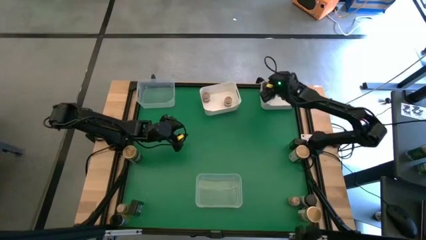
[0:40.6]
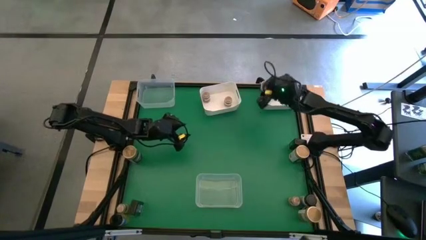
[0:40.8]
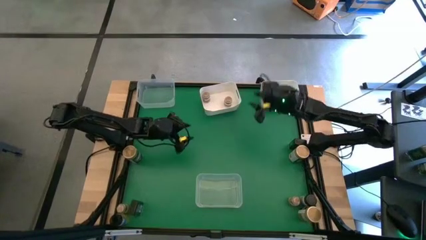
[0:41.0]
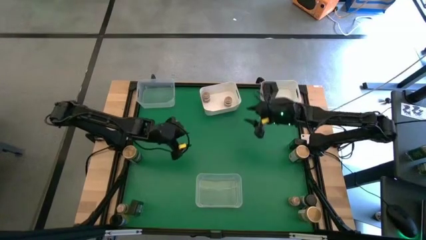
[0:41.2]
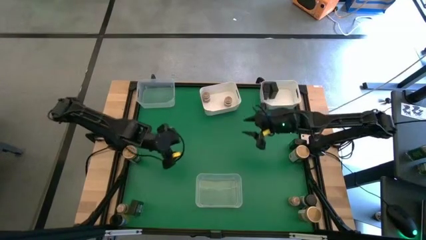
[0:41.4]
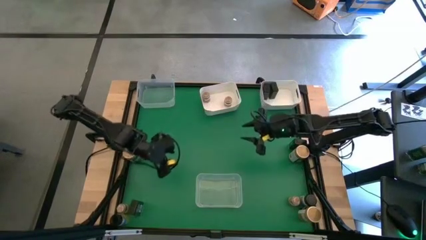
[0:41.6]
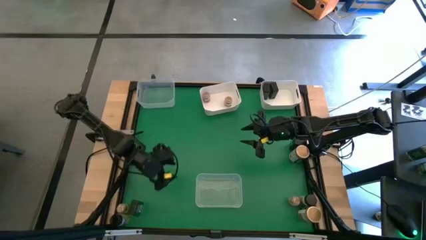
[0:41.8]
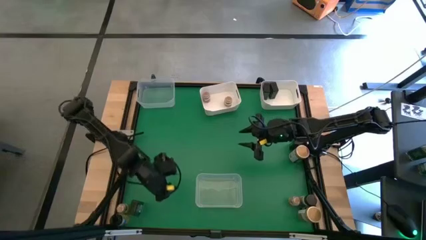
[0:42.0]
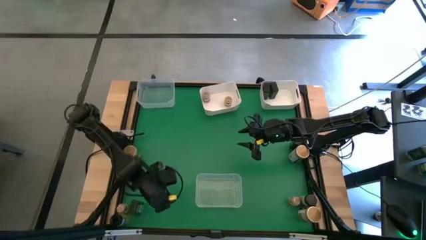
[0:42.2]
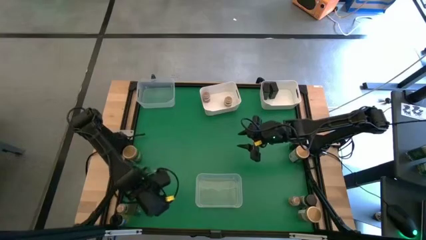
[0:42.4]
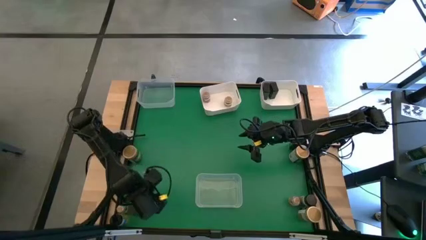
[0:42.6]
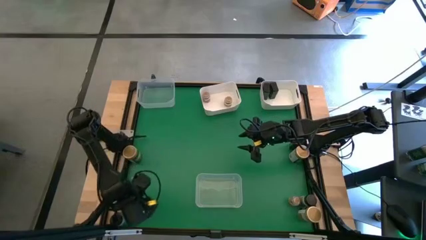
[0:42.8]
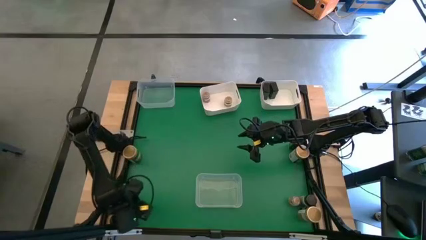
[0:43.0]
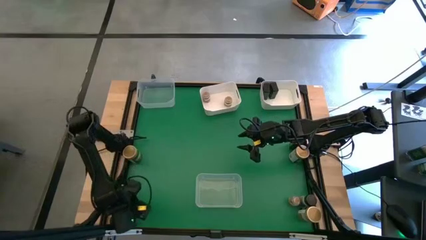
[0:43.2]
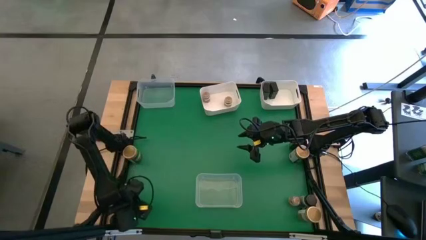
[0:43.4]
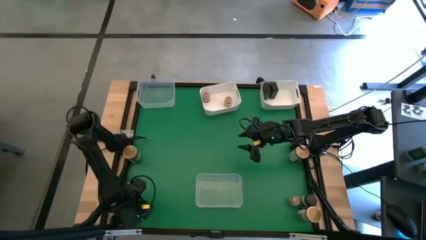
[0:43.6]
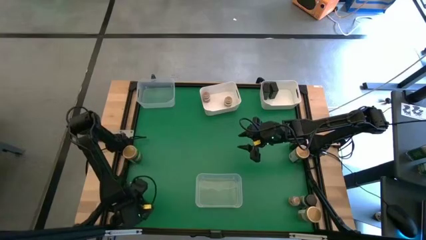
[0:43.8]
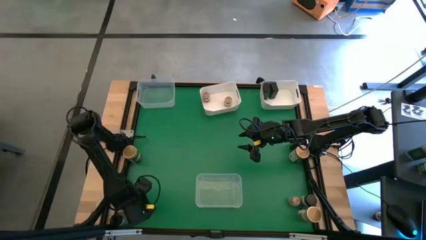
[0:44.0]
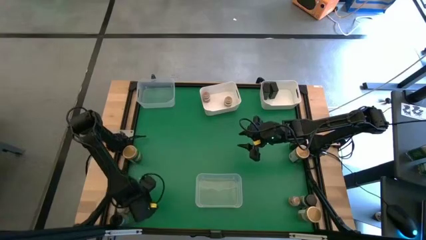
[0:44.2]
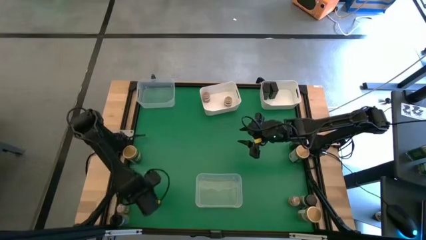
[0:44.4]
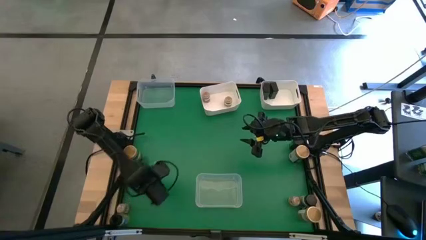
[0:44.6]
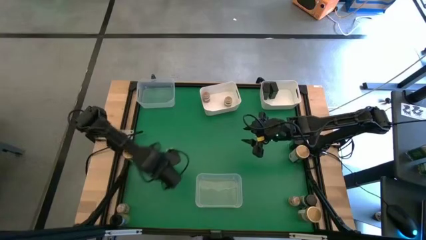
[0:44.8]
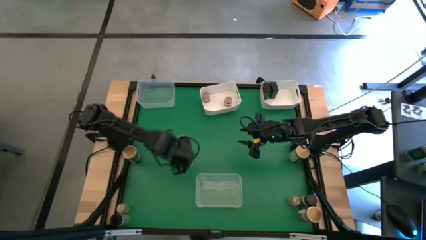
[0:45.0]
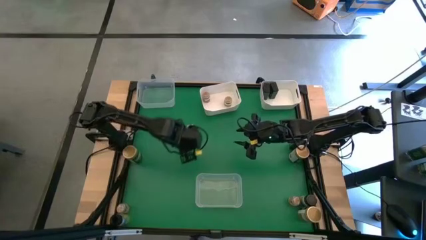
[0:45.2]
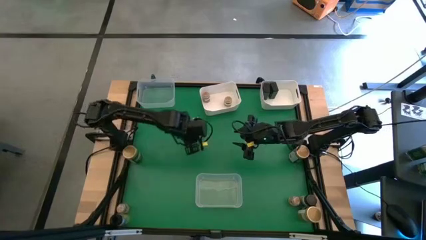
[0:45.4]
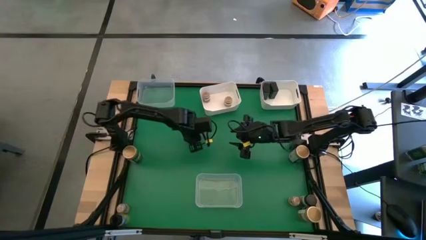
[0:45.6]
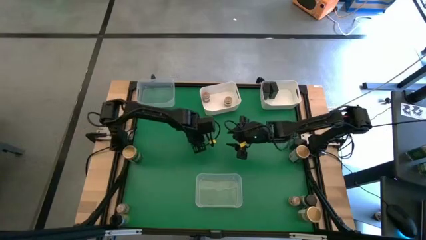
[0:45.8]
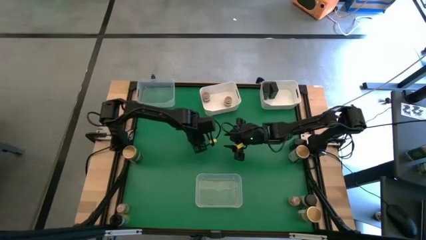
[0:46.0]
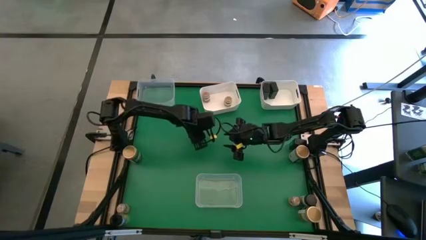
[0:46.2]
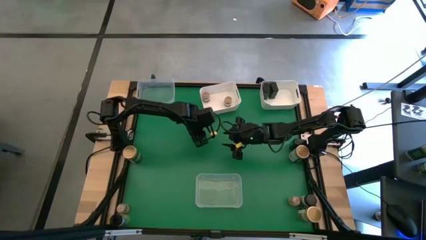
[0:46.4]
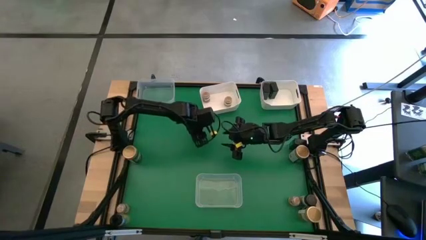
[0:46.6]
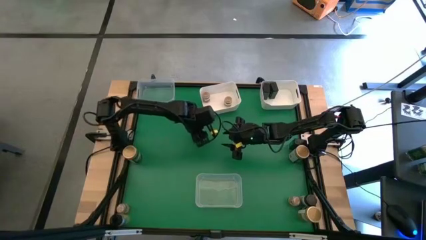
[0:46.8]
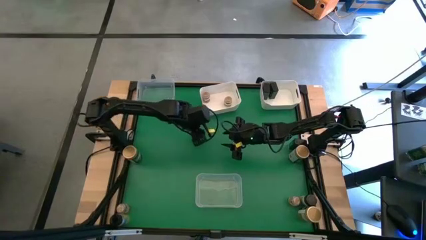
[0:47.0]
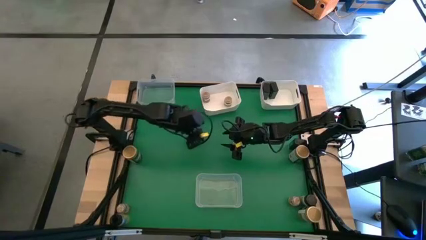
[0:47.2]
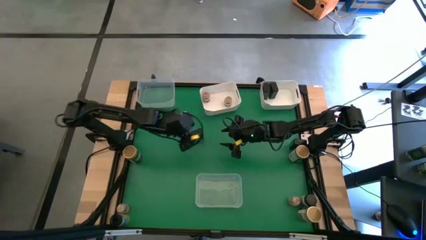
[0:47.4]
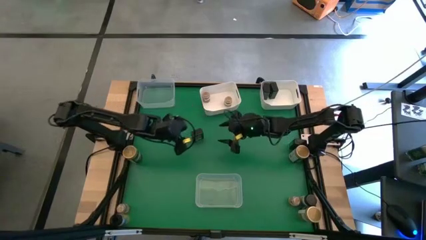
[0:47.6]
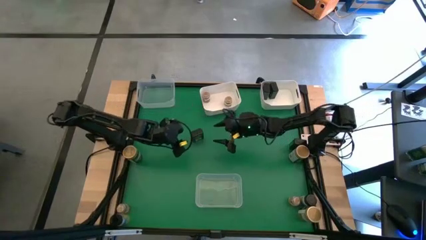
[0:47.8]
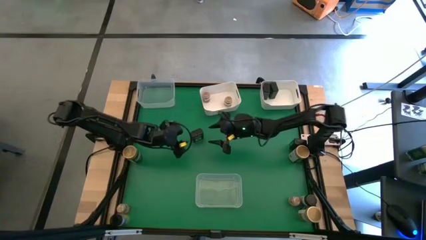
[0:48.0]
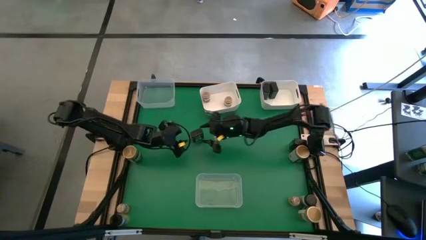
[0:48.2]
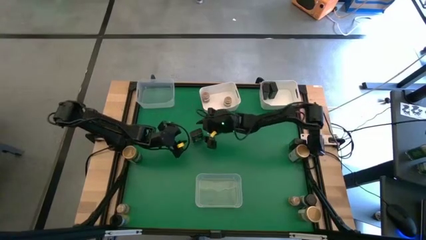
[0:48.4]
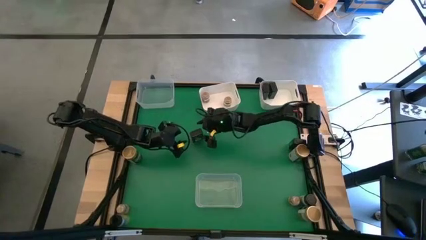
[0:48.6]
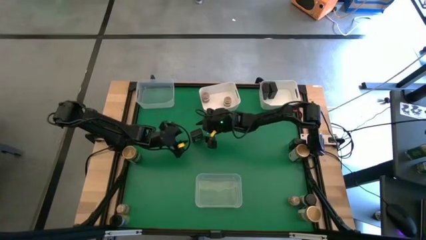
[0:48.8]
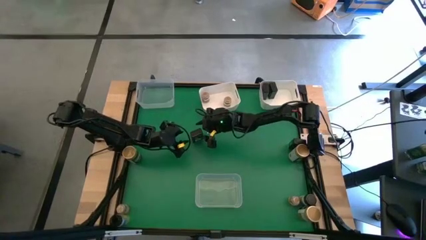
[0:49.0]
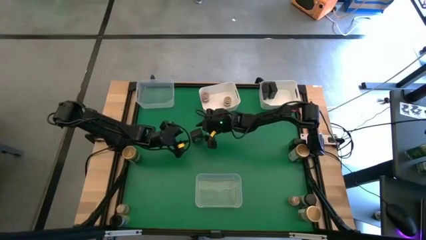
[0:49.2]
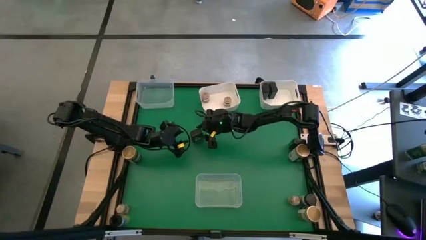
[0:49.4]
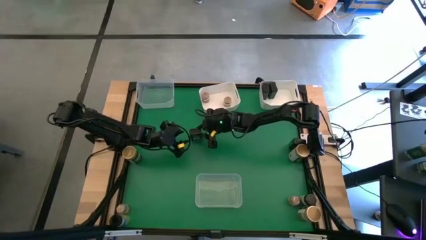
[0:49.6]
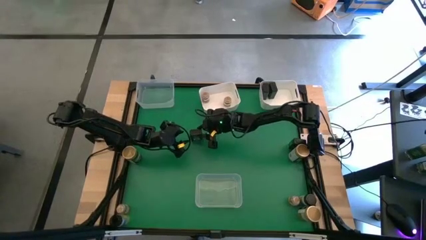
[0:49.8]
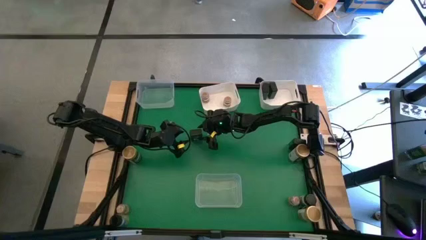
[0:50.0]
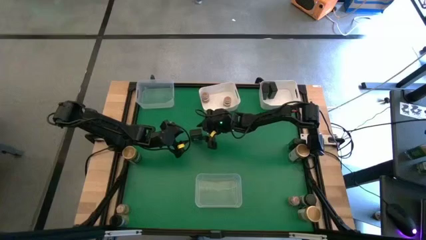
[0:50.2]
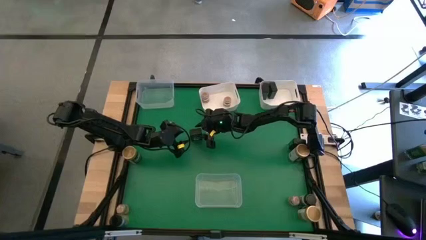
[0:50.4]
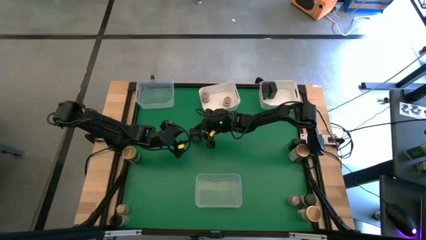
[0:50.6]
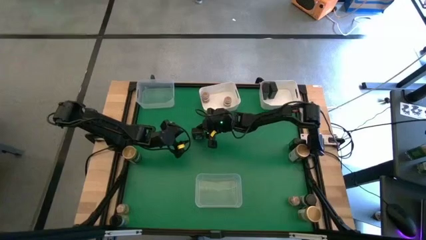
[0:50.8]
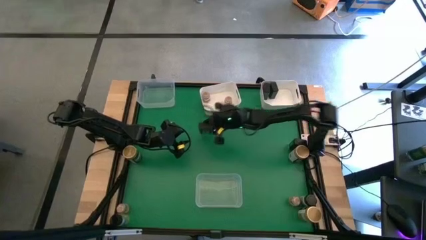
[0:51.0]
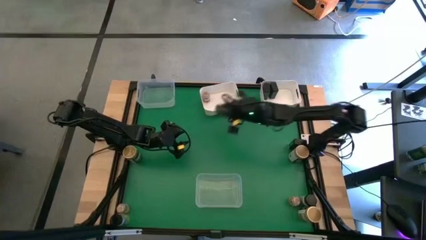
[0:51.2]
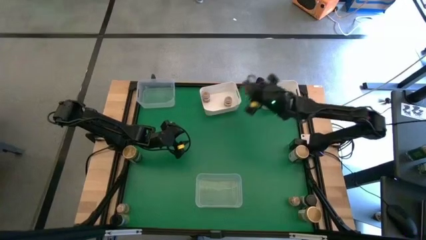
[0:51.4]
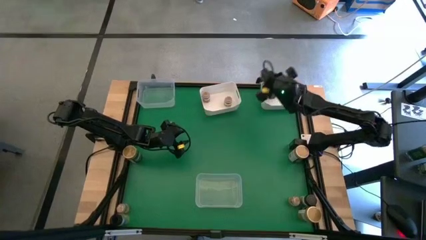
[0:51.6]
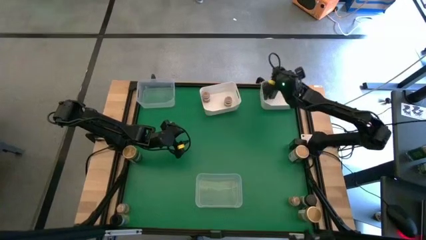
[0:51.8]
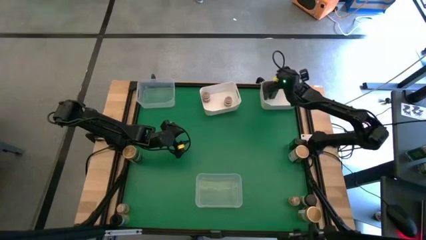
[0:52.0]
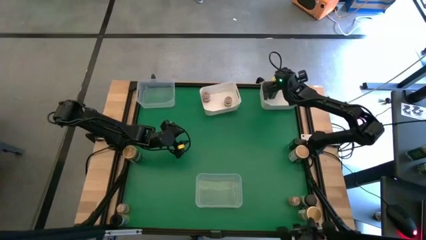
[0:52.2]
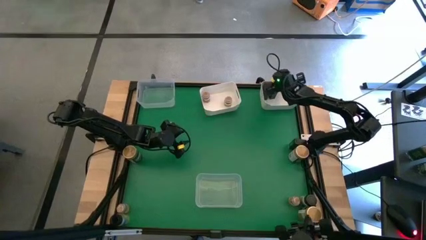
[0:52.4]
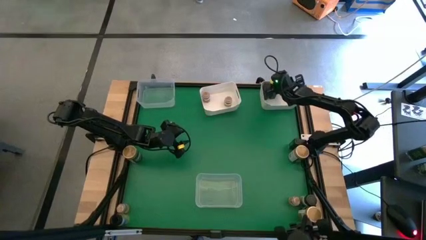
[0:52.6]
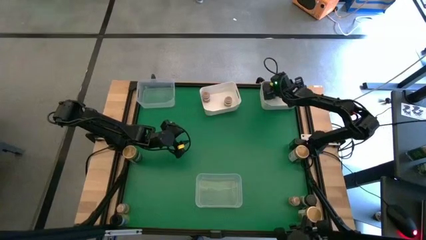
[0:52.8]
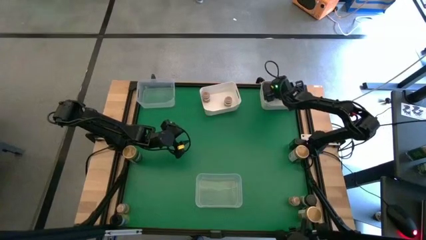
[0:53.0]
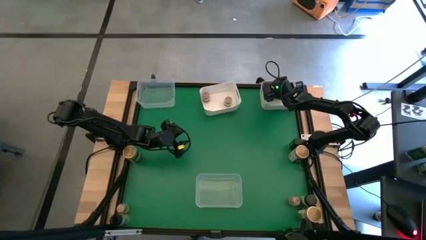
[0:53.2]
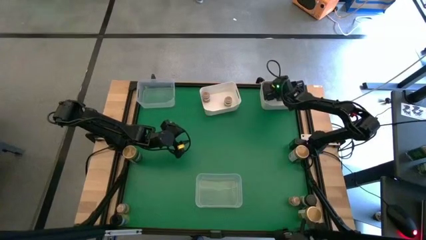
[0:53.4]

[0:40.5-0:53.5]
Task: Sort spices by type
Put the green seasoning can into the right white bin

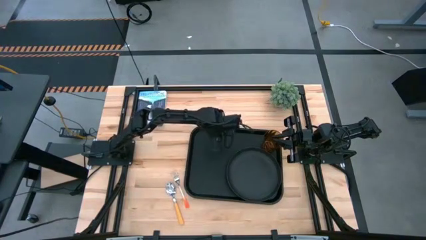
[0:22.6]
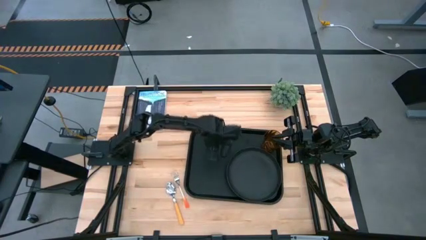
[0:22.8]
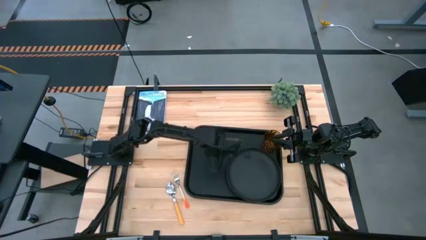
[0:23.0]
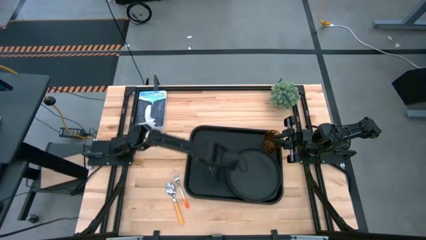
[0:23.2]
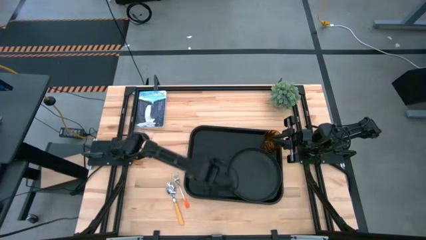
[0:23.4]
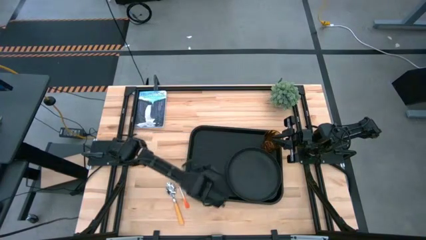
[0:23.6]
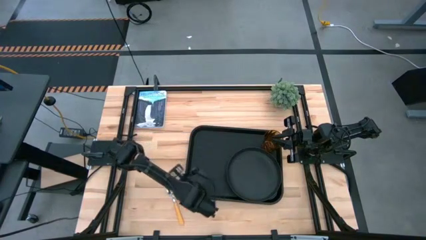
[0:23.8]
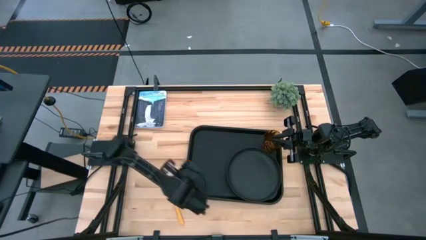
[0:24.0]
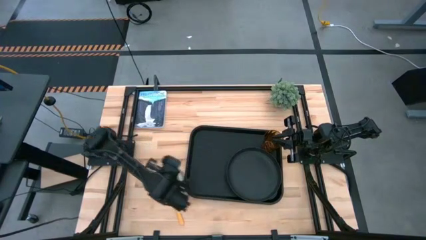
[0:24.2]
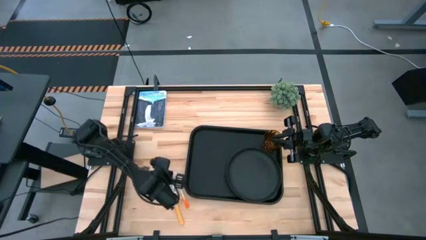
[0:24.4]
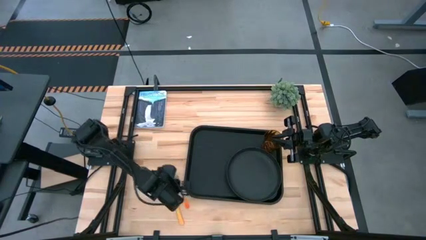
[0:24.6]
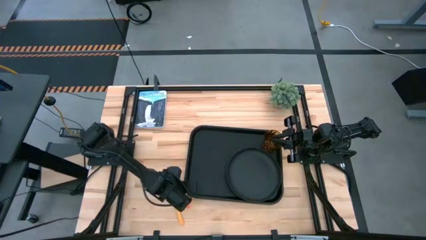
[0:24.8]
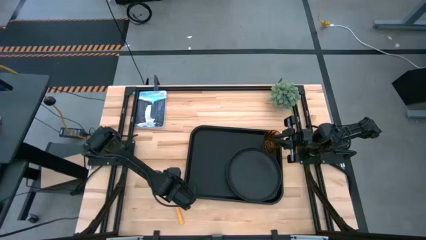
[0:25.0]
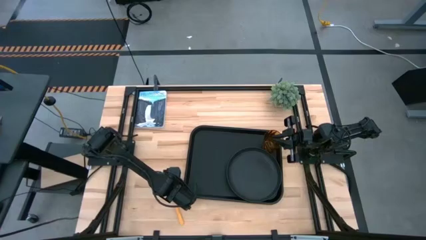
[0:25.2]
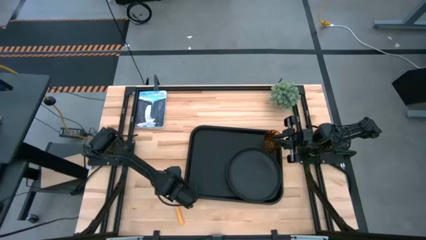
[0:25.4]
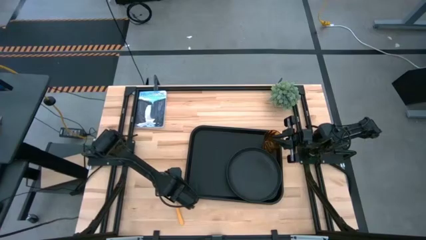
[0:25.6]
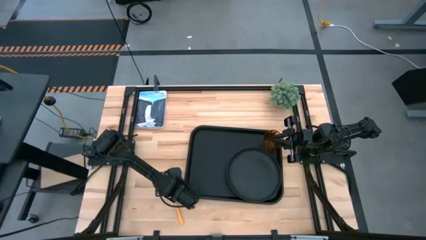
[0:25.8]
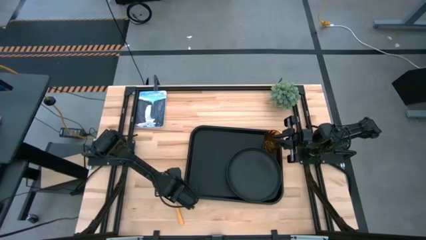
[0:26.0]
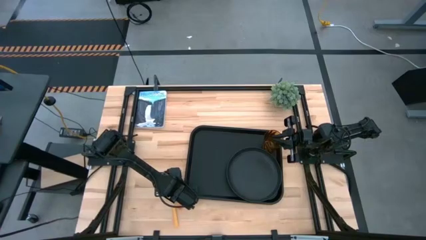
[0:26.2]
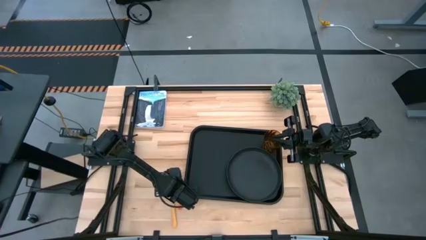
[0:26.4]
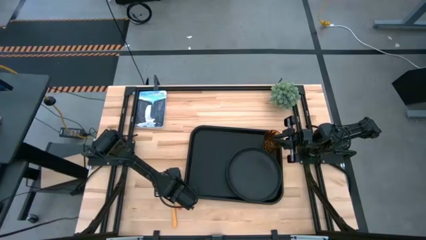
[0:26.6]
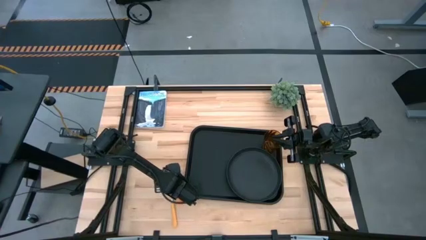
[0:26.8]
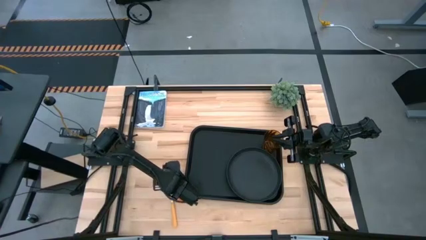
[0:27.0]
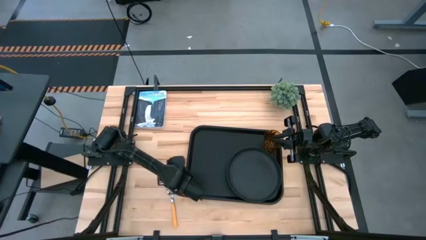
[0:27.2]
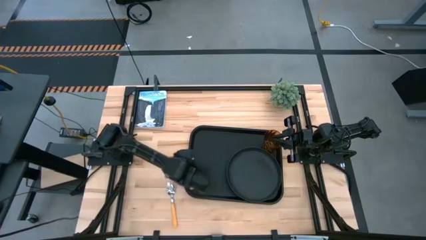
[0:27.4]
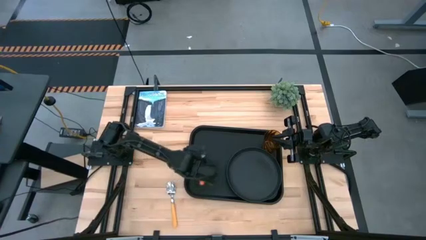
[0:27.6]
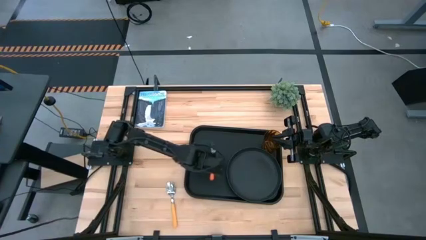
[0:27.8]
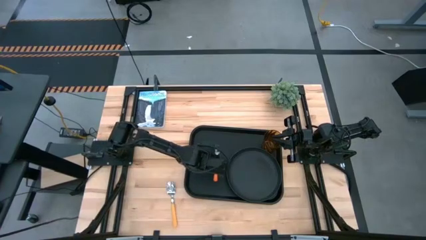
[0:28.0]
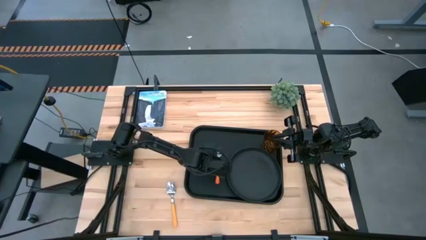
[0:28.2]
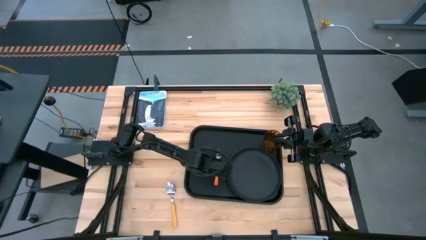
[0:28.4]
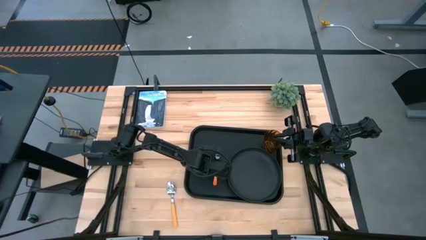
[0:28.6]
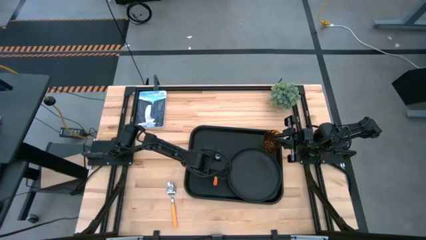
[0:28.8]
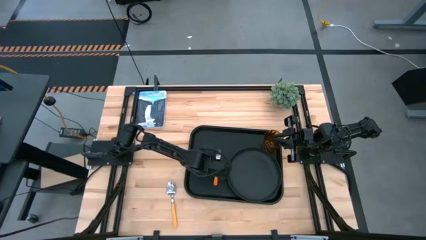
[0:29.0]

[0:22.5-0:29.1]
Task: Pick and place plate/cup/fork/spoon on tray
Put the orange fork on the black tray to the left of the black plate
